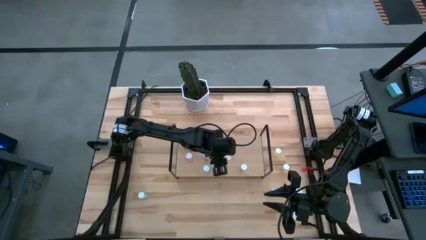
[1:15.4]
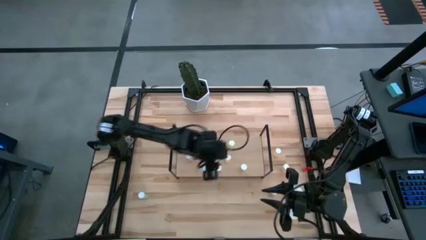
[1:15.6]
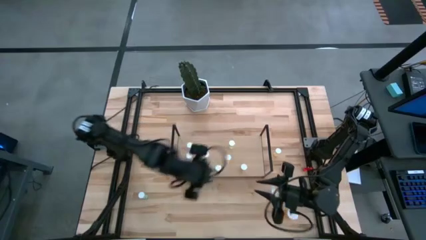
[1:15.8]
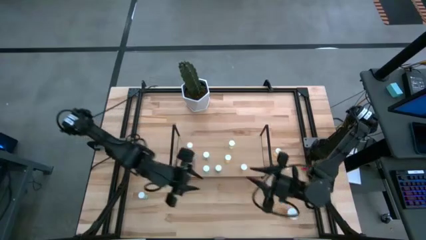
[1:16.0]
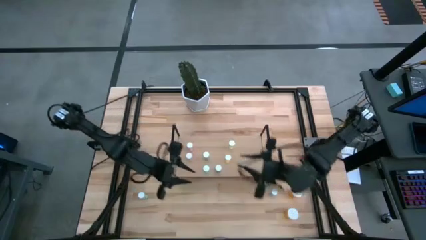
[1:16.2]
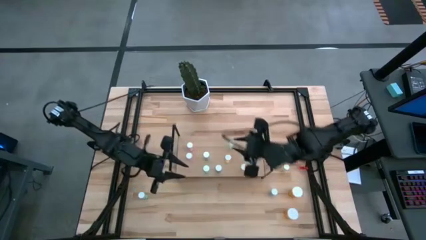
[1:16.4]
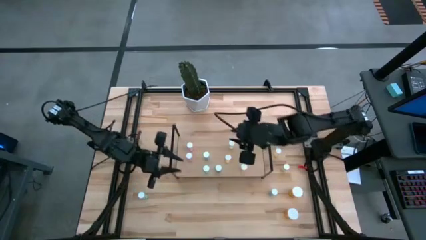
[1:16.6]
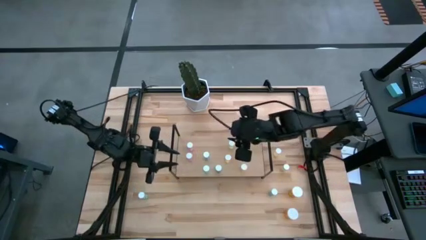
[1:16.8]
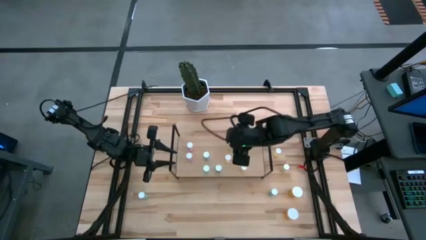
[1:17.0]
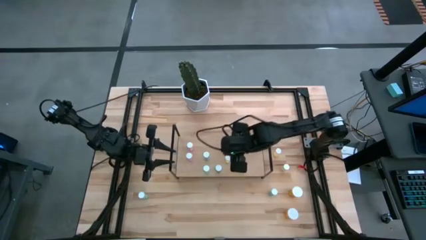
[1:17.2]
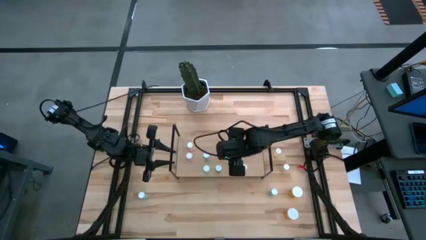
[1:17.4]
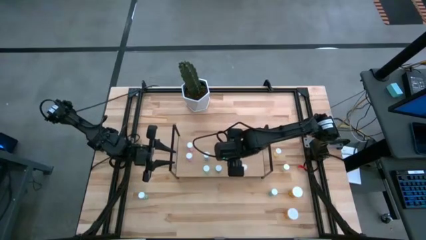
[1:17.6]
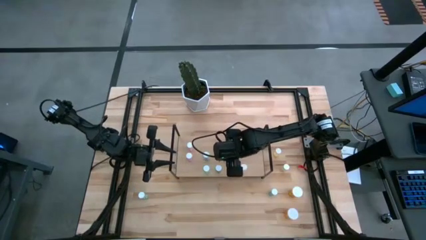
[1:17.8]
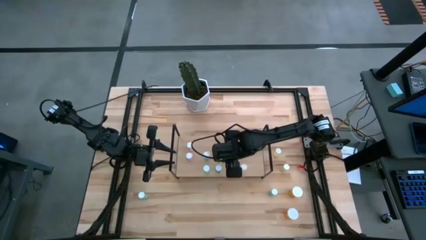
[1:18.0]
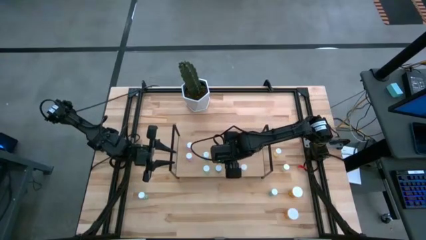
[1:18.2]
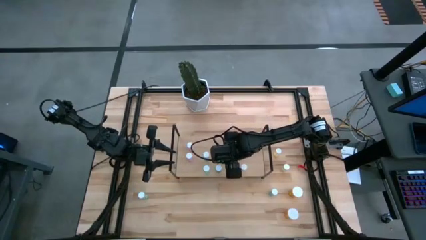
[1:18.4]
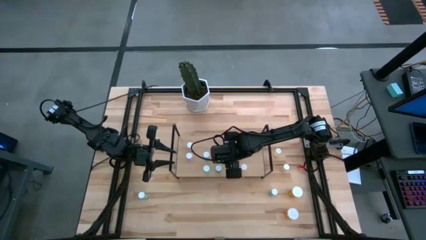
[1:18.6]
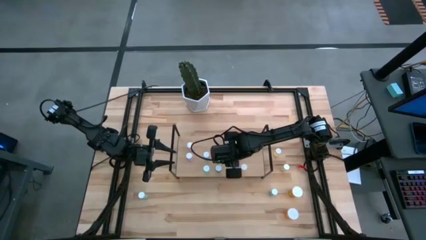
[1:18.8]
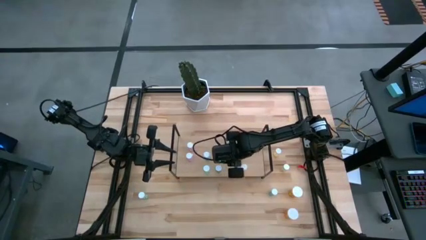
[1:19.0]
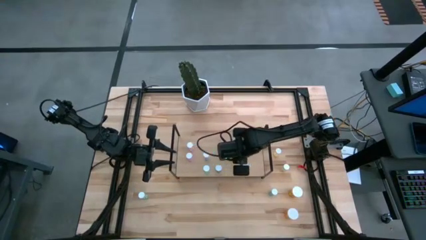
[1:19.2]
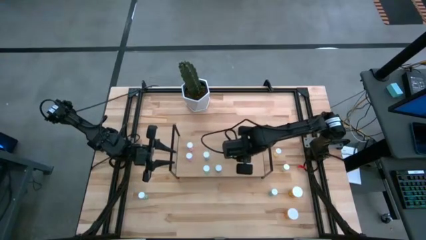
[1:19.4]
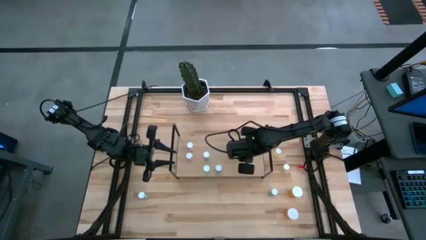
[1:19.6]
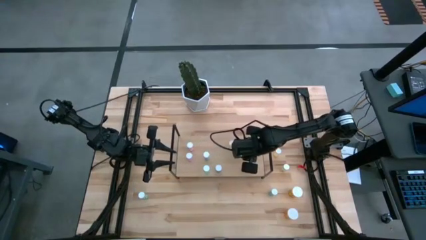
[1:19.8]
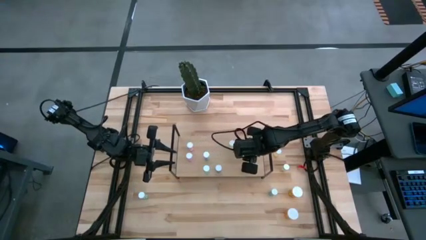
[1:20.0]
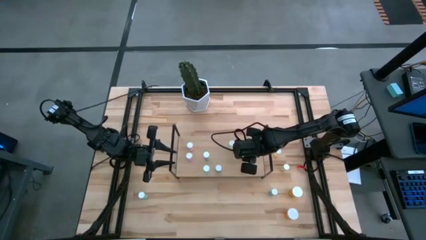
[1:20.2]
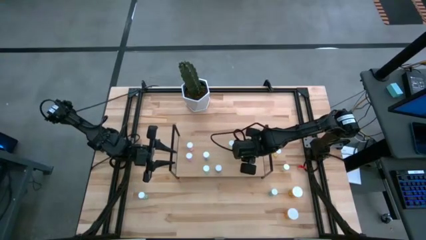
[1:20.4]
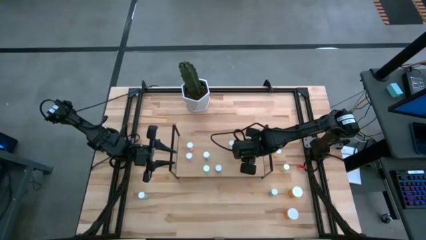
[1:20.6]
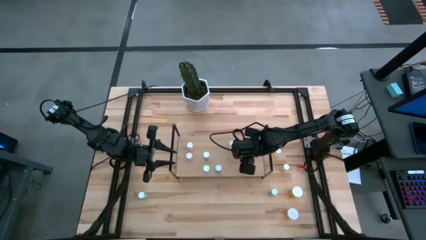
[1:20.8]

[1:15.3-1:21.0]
Task: Pick and place medicine bottles onto shelf by color
Adjust the yellow pill bottle on the shelf

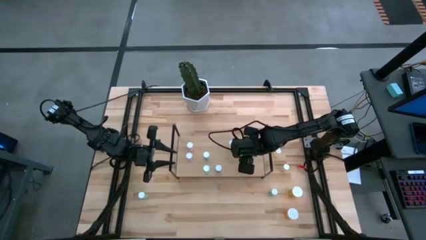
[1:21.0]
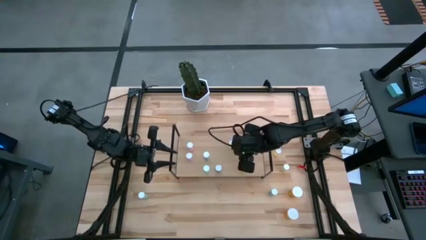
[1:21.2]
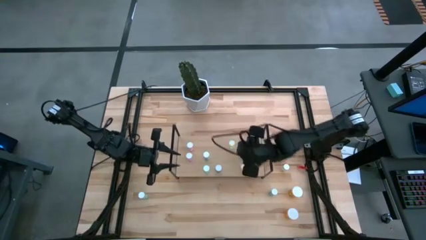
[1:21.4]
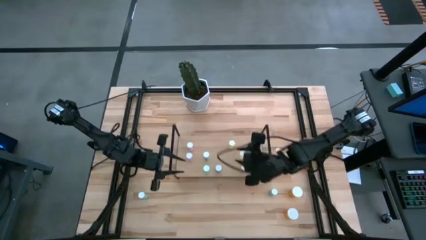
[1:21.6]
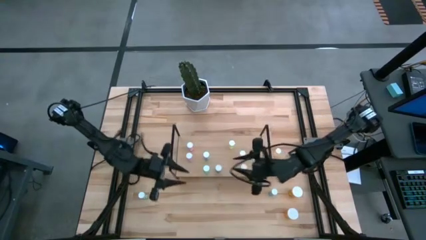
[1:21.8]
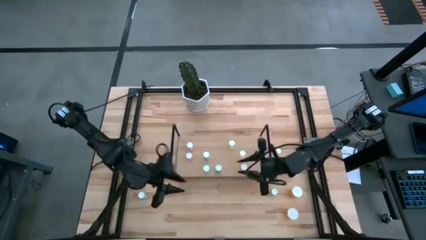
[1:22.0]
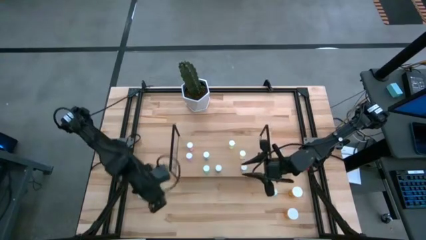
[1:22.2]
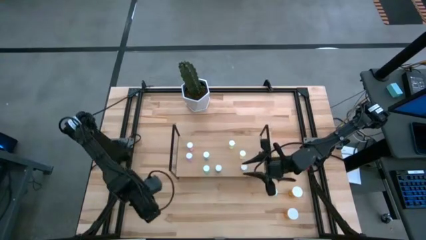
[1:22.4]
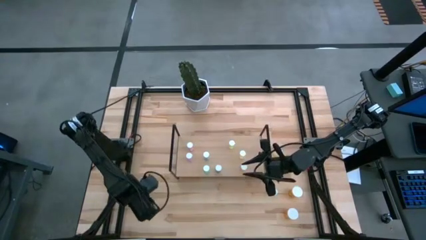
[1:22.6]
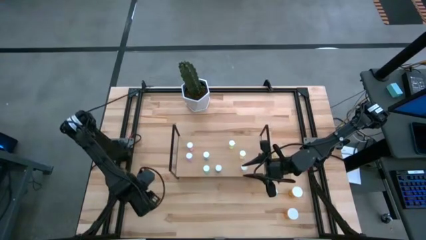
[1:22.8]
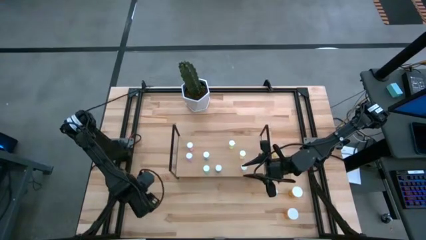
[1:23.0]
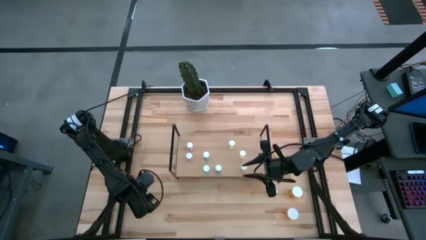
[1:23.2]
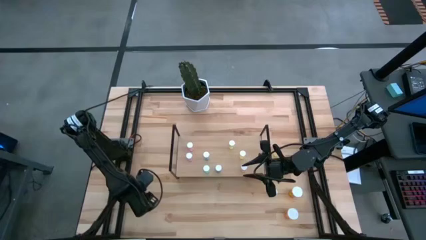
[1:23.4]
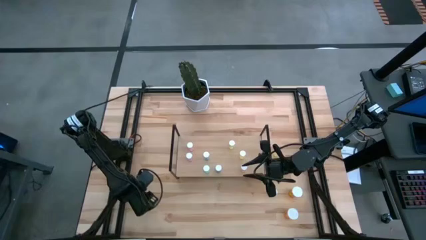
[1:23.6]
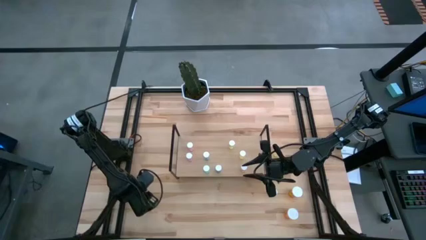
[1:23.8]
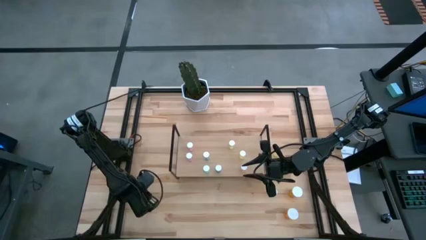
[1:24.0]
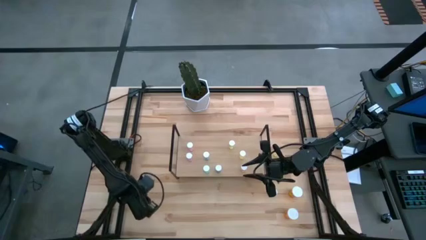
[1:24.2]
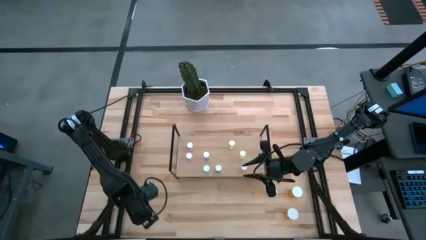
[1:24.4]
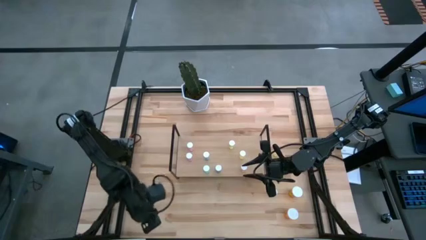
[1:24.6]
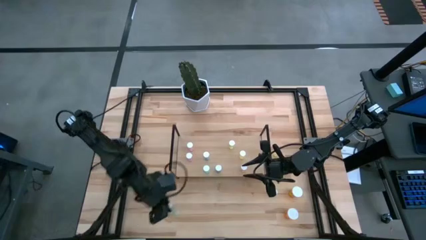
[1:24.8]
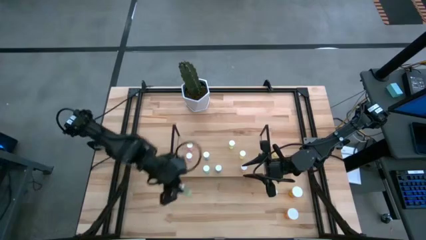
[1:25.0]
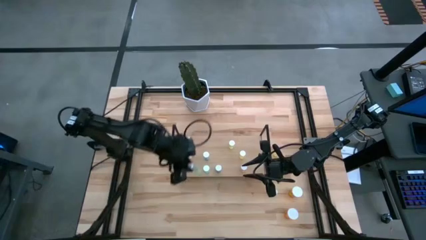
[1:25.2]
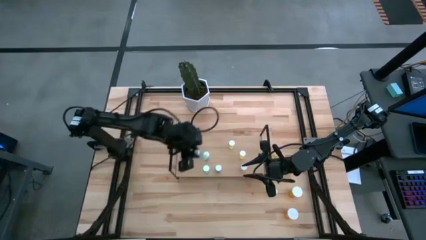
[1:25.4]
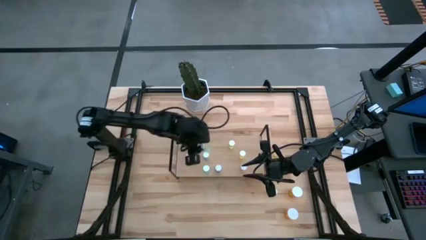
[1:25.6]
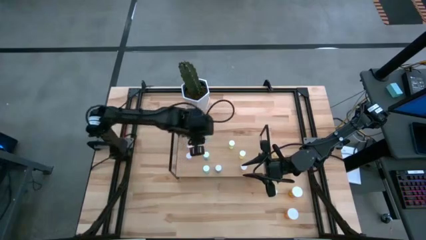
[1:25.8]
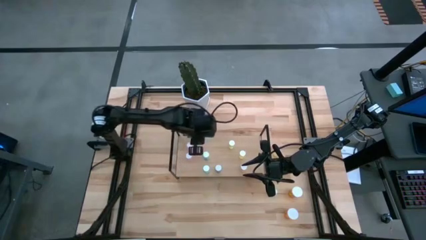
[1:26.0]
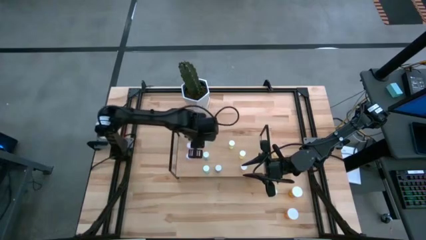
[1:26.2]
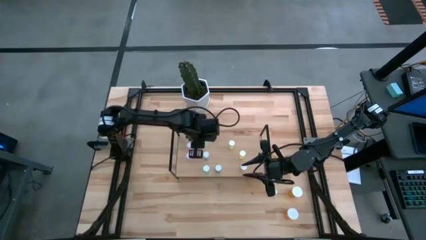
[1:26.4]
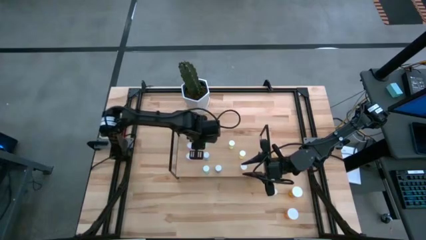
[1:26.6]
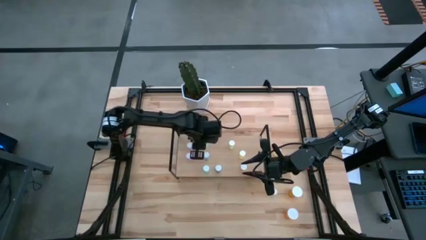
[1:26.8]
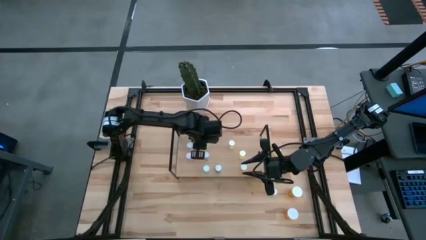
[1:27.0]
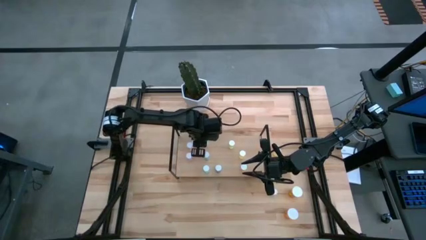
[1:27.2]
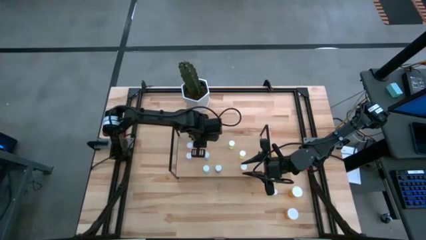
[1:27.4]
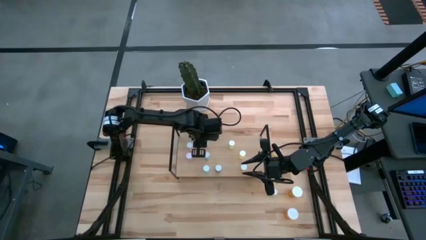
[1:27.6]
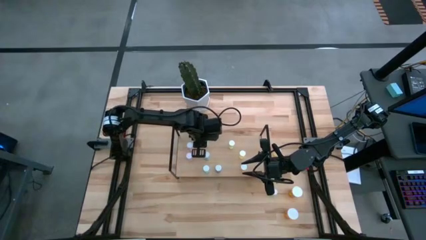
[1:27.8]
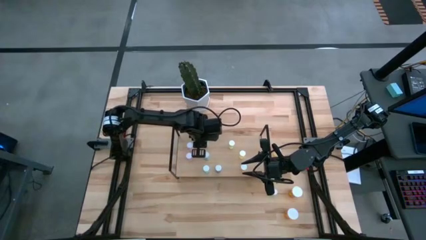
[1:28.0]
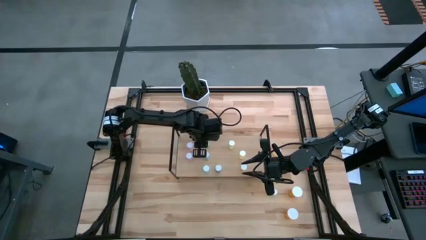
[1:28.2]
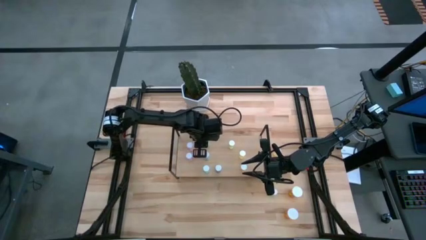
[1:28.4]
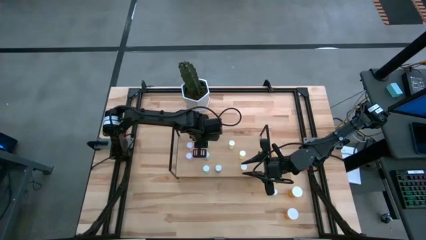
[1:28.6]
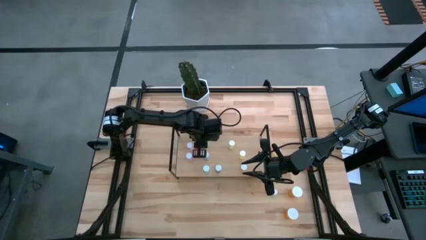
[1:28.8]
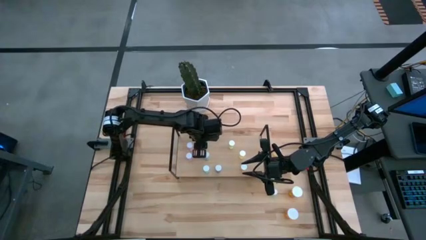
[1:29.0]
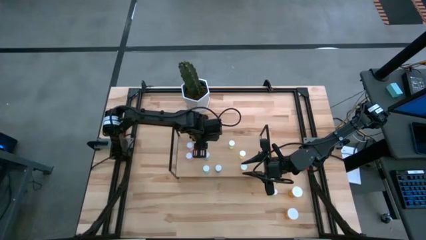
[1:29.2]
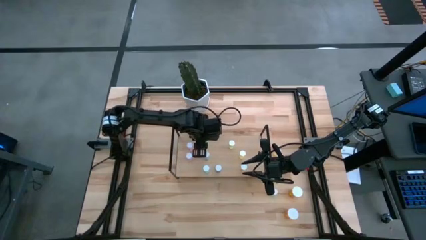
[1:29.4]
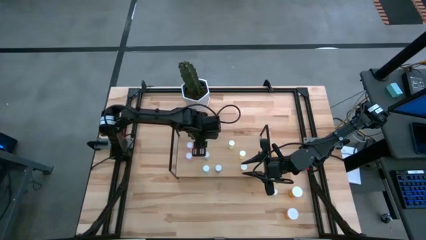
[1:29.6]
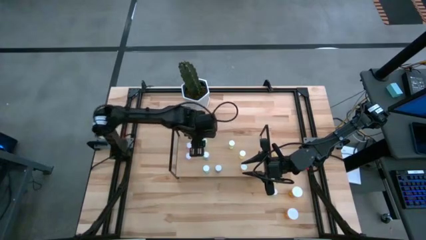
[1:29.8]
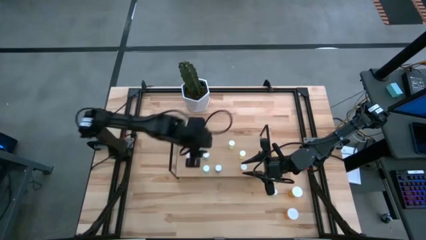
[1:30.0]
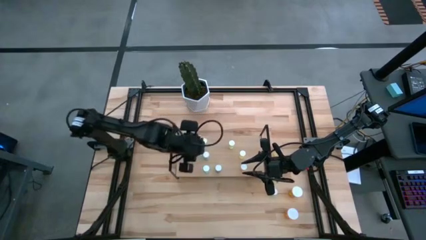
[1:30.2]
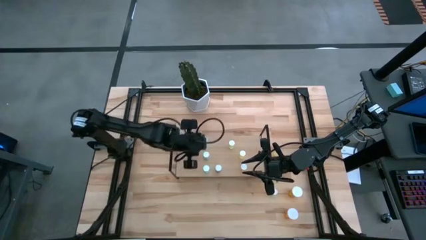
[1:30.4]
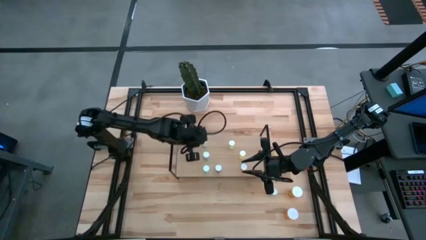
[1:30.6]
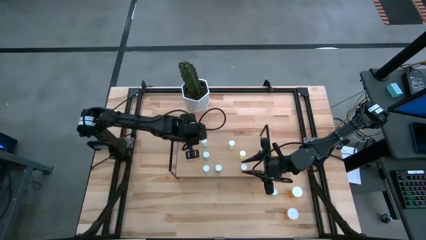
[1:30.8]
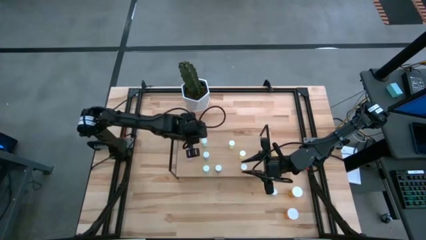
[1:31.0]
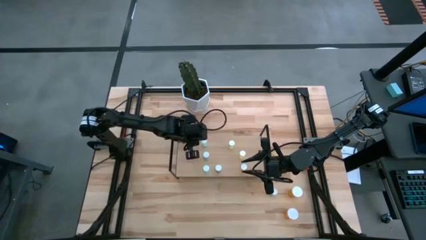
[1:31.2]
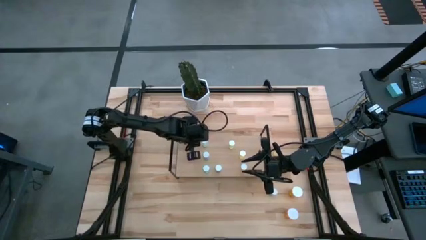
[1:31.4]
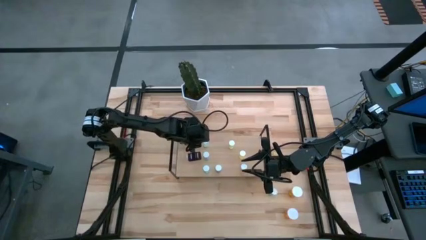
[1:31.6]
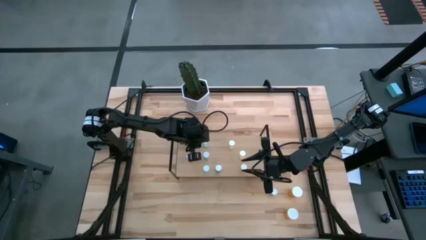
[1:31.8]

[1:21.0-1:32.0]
Put the green pill bottle on the shelf aligned with the other green pill bottles
